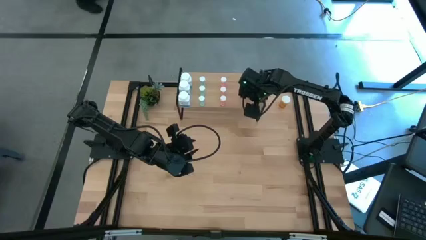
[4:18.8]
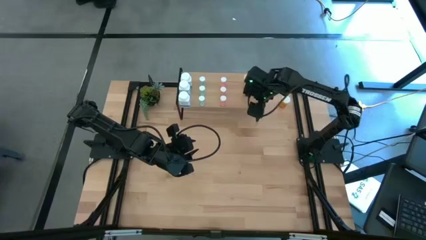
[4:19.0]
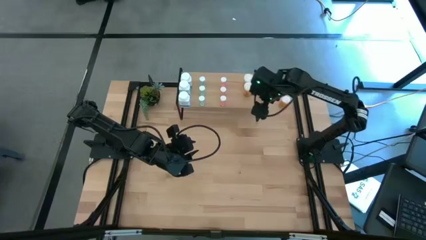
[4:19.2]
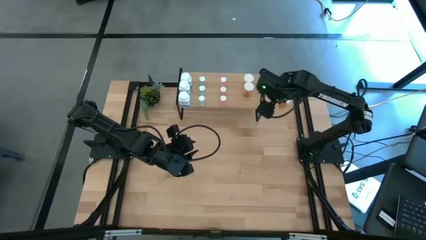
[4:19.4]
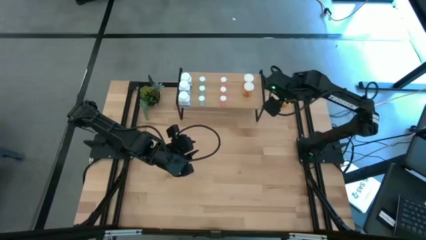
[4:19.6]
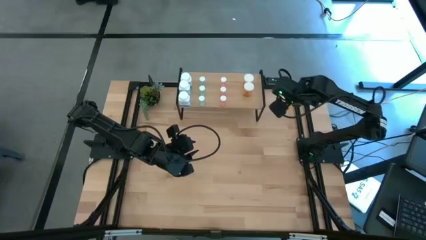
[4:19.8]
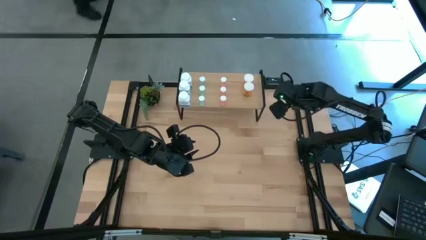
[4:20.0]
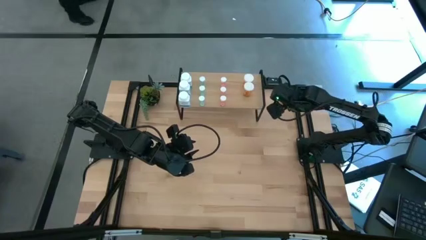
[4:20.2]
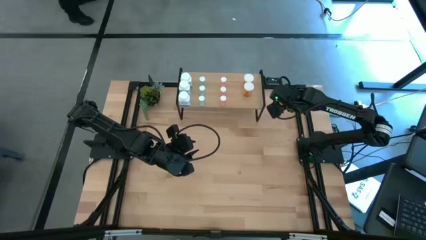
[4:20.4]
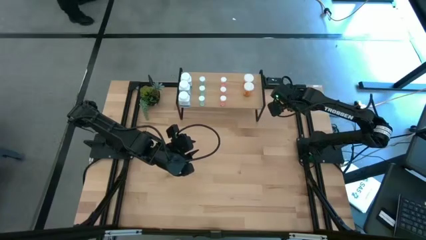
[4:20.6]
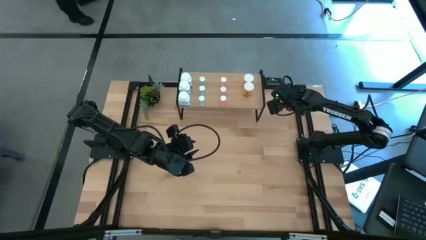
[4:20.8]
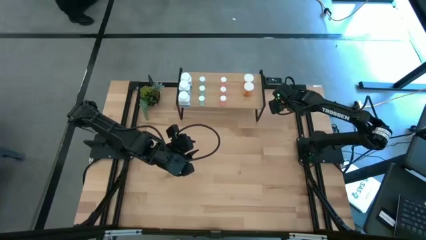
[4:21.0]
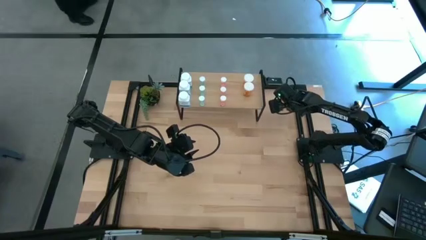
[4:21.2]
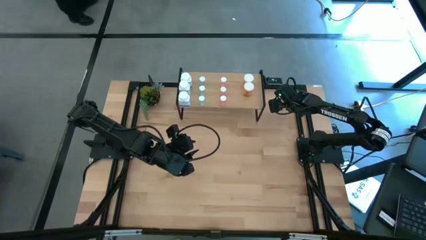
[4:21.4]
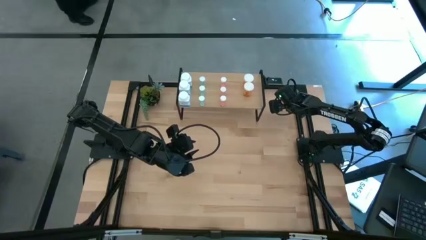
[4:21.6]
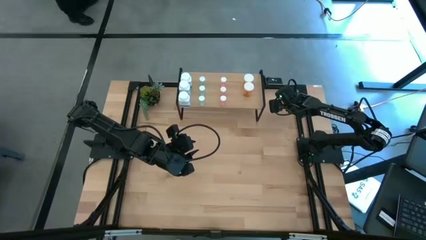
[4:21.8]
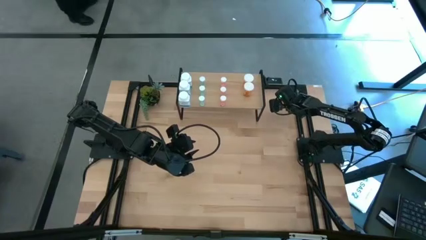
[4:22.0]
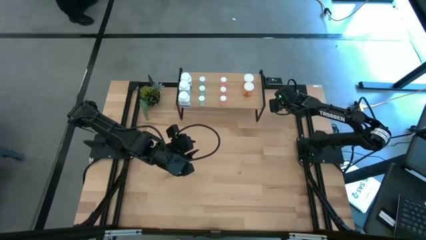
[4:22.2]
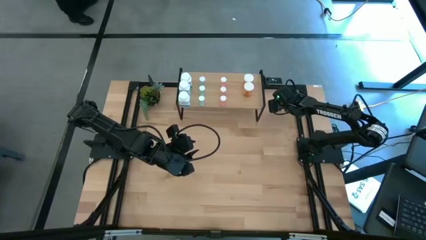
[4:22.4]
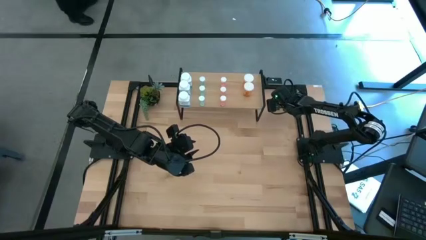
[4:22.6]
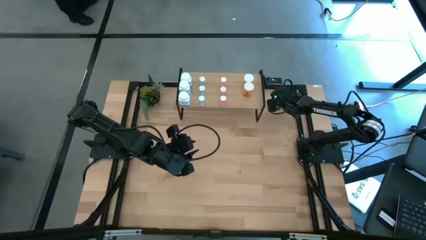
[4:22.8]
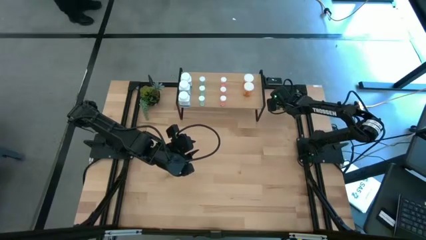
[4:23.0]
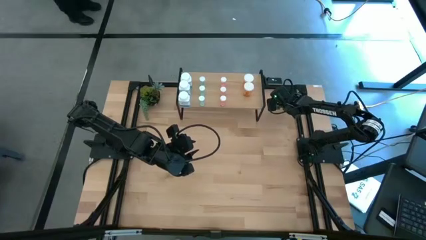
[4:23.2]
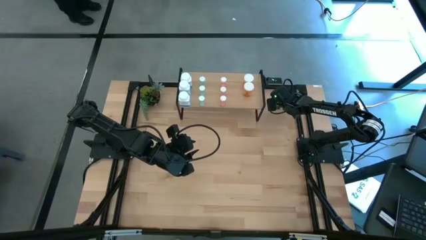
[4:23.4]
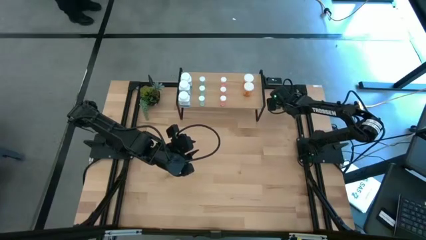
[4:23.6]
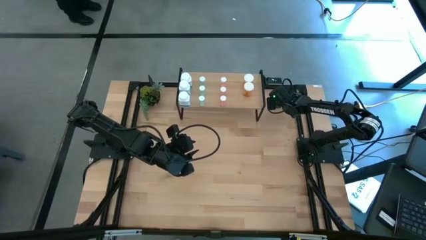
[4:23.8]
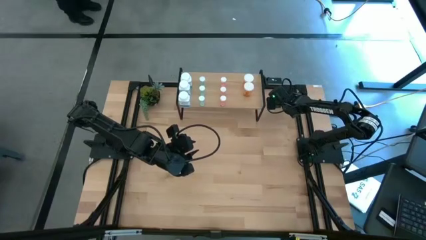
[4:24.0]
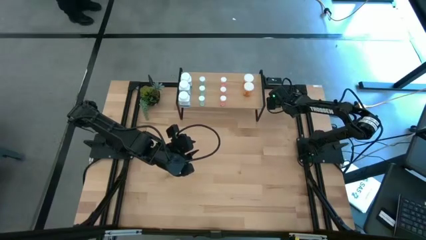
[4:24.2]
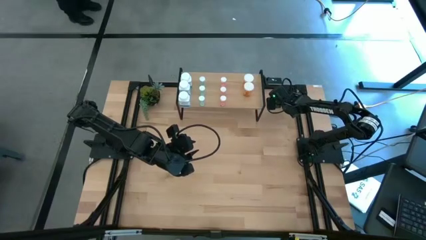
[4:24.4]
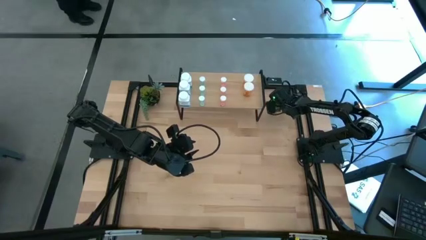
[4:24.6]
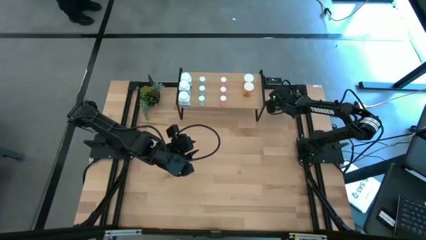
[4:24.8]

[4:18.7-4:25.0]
Task: Pick and place medicine bottles onto shelf by color
Put the orange pill bottle on the shelf aligned with the other orange pill bottles

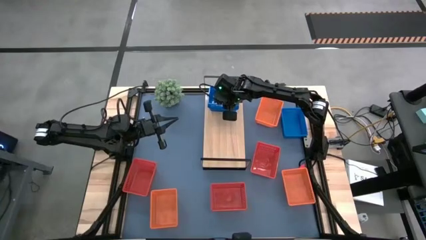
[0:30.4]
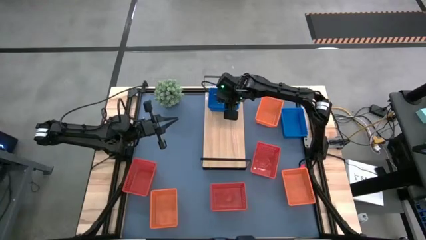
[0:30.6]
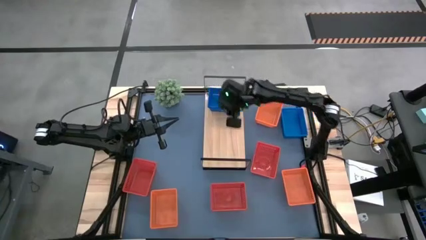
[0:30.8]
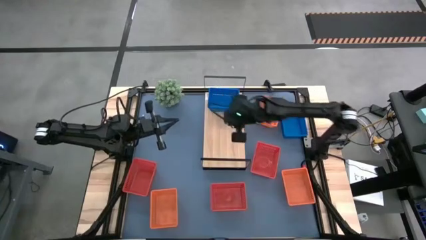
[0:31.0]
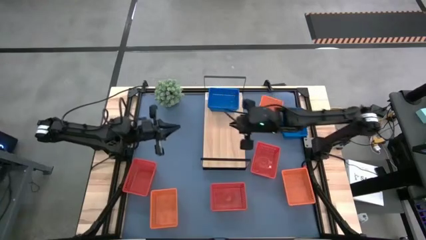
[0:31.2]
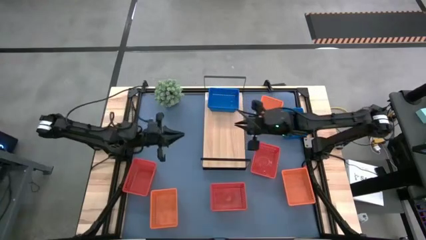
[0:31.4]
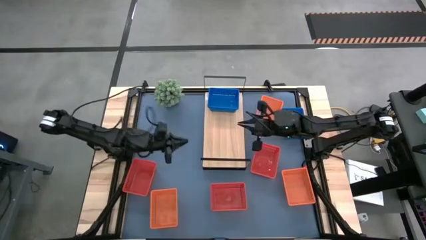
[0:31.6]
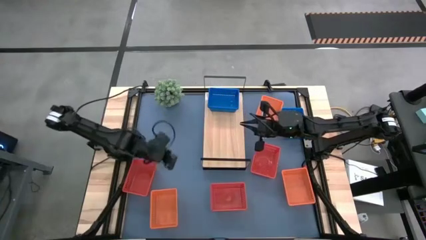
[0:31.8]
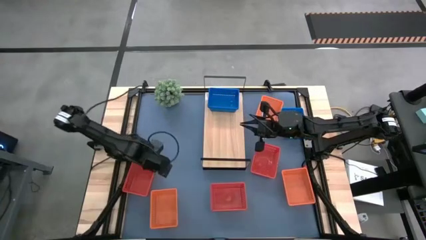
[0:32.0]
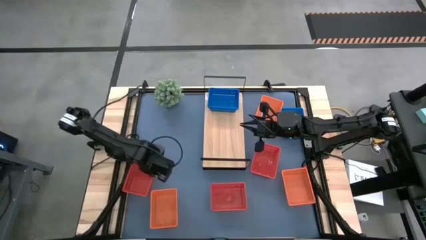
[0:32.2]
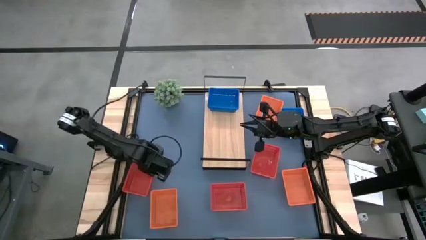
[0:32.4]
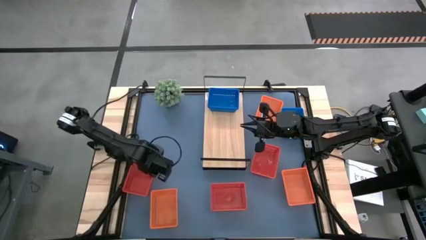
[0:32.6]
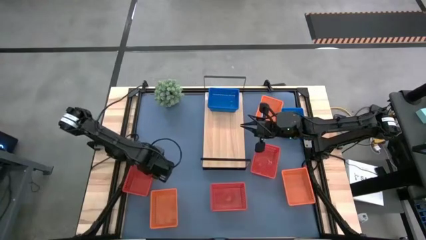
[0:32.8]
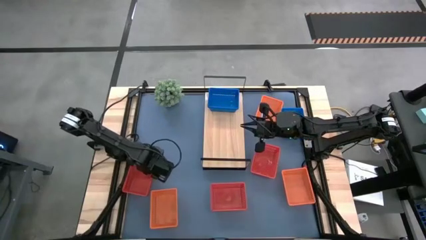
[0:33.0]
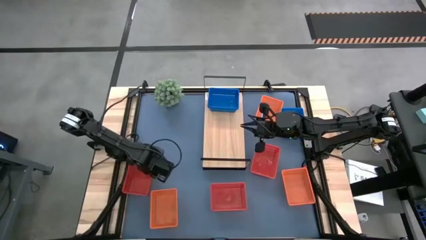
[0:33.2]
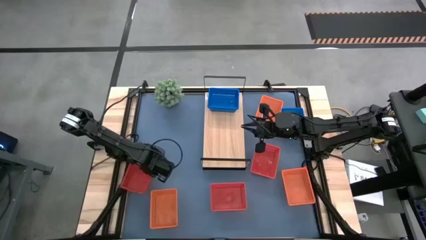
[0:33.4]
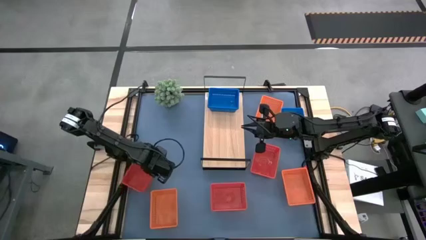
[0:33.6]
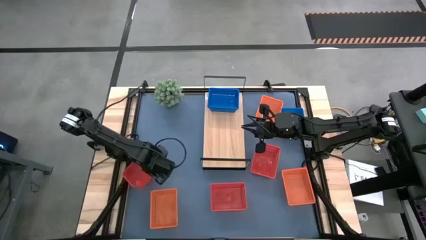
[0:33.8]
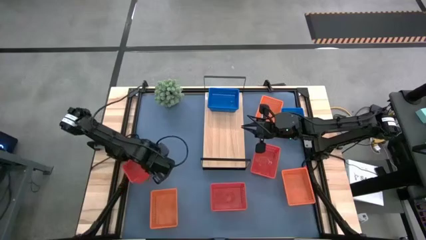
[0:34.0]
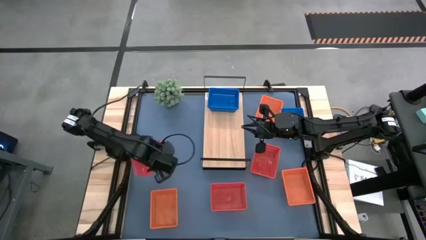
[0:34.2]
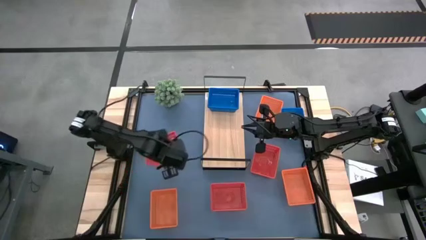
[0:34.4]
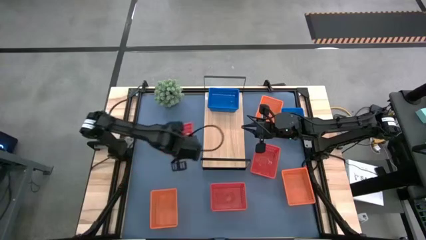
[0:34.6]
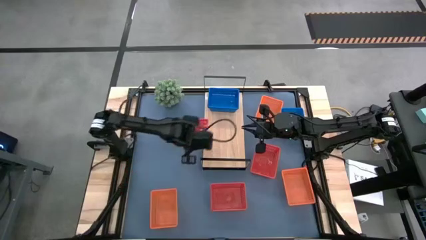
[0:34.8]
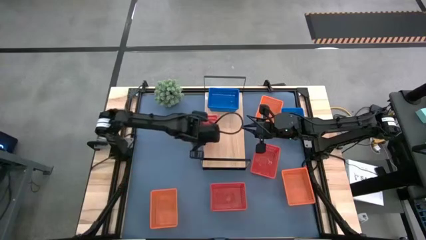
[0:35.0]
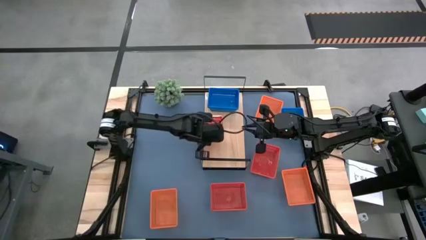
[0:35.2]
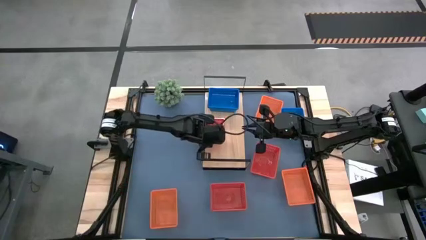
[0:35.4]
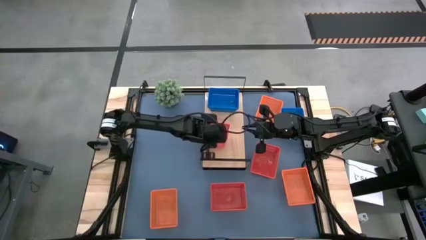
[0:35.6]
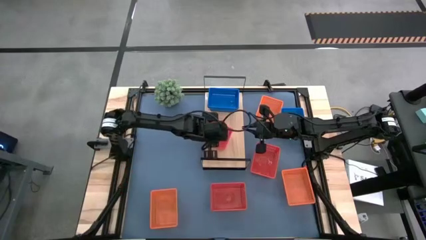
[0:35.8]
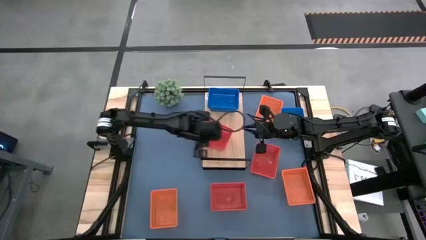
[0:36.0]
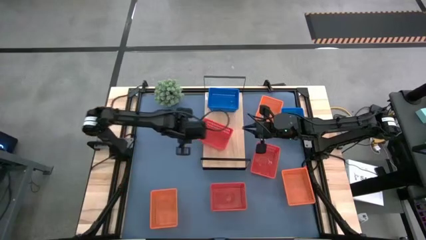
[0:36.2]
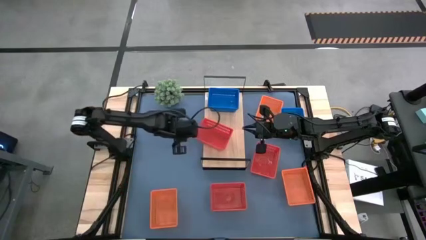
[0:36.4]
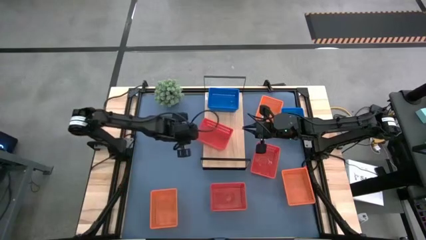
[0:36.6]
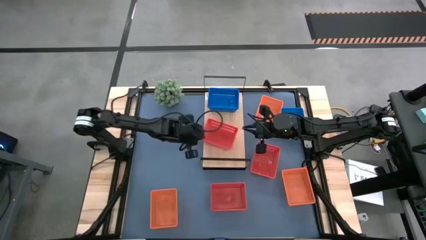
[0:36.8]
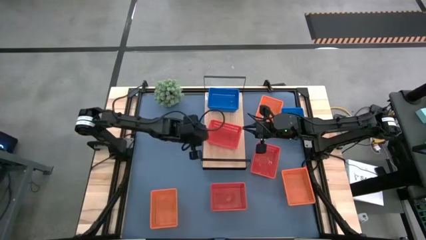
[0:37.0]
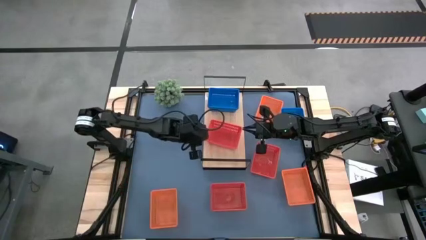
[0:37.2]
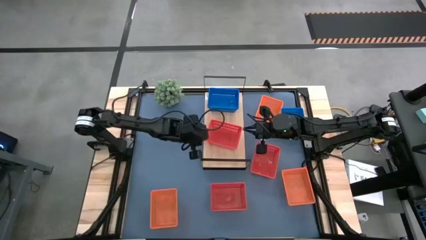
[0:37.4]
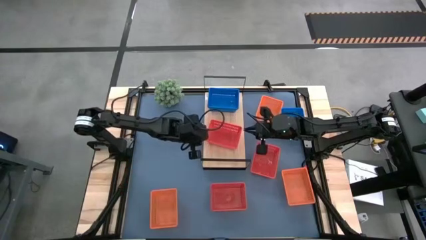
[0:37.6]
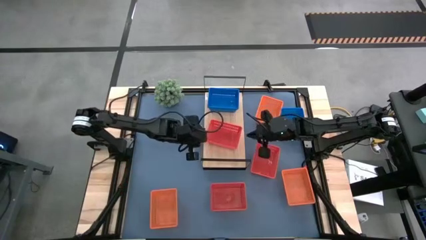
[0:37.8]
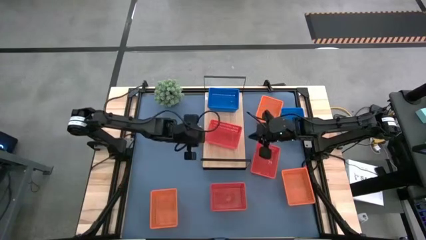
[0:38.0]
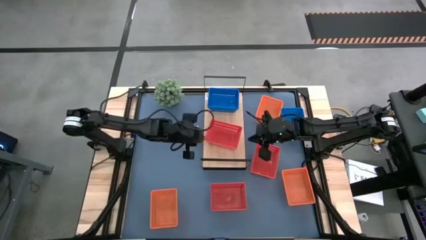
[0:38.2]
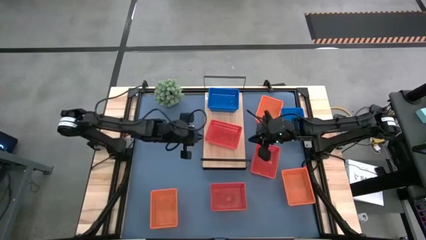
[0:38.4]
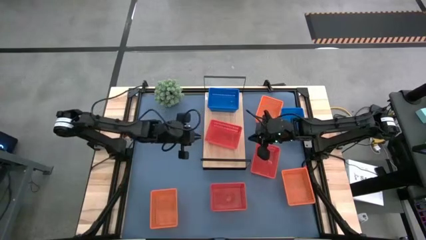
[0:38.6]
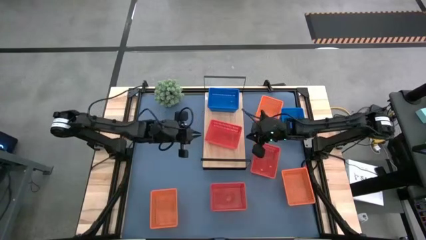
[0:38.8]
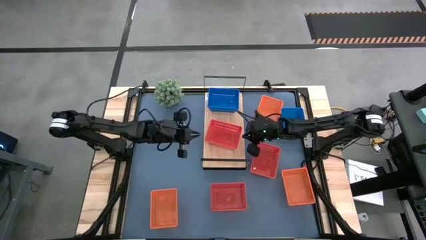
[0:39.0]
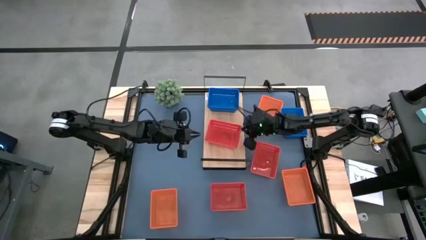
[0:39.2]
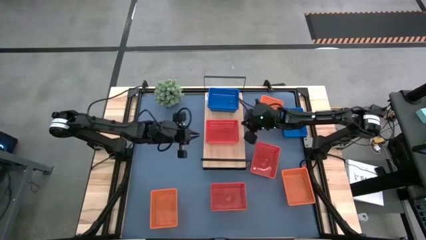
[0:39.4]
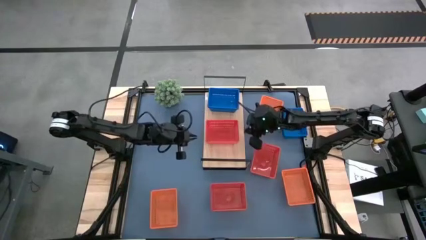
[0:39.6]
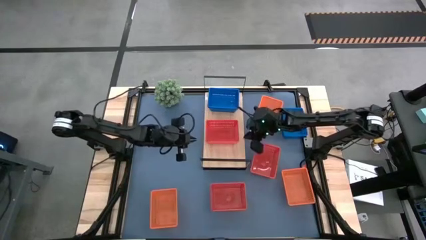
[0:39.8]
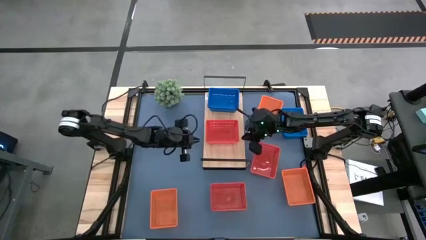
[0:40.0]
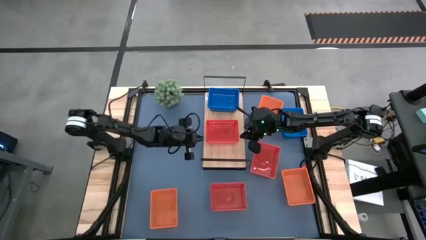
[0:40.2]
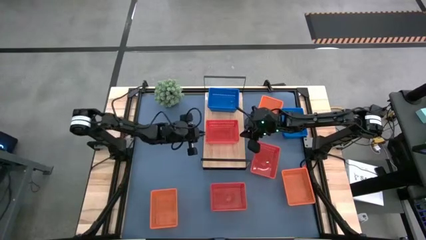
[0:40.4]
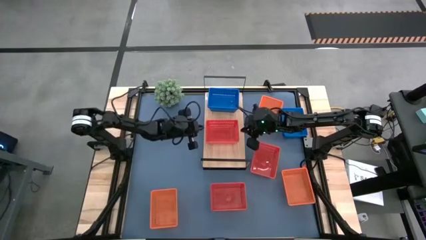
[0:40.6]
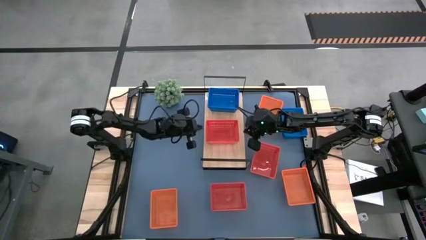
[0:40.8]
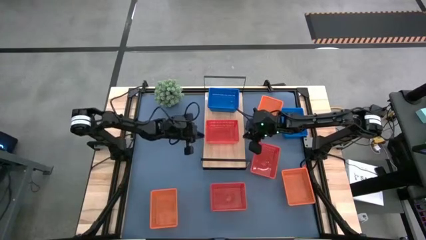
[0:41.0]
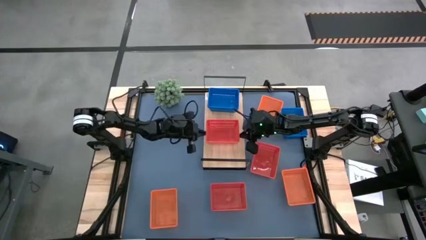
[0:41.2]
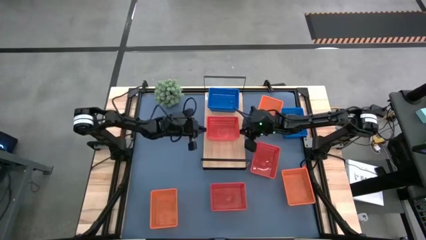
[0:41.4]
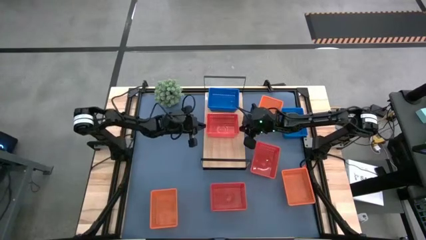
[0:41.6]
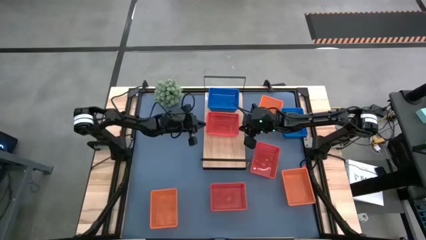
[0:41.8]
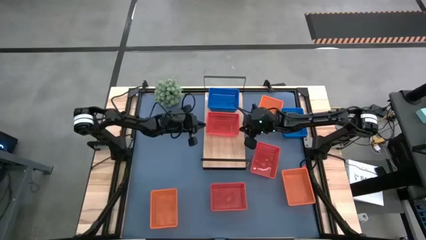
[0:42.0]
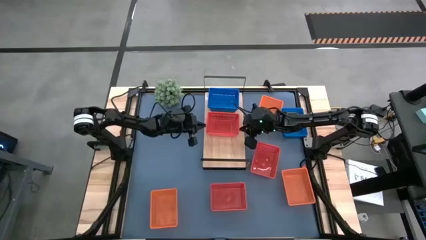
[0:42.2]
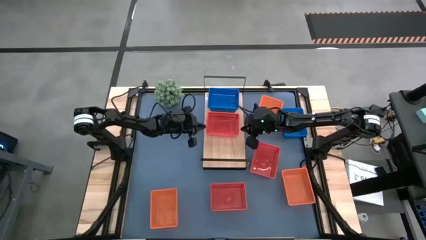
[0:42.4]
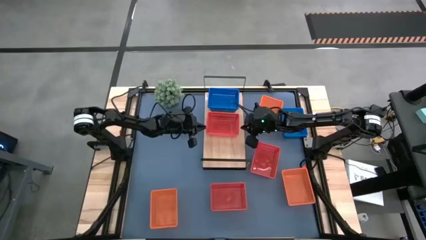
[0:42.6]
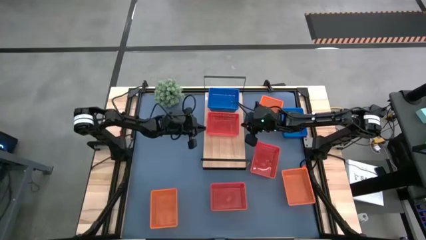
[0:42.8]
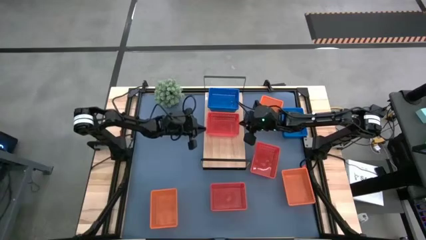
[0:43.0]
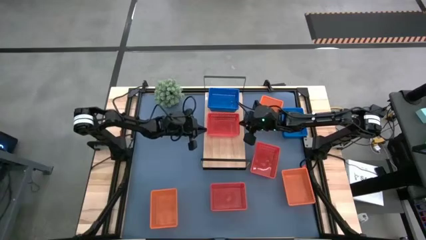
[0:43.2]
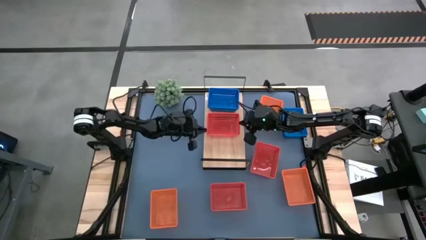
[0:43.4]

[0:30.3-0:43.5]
Task: Stack baskets on shelf by color
Put the left red bin on the shelf
